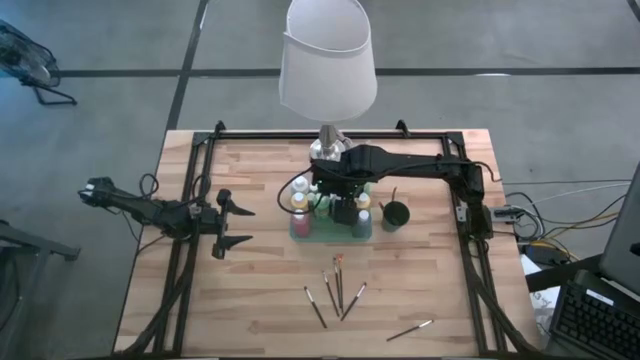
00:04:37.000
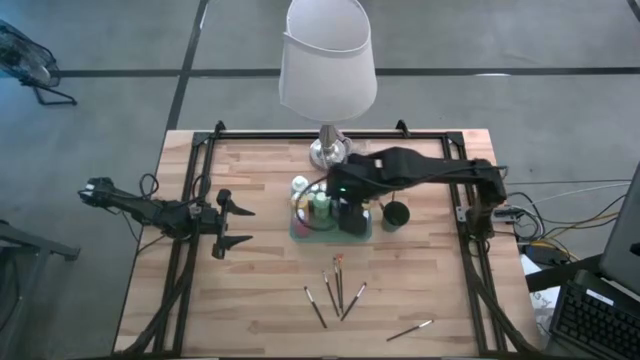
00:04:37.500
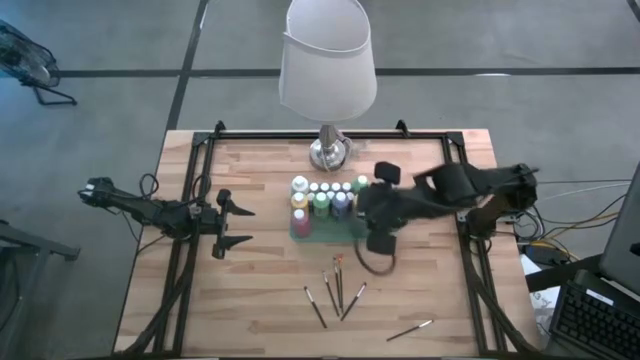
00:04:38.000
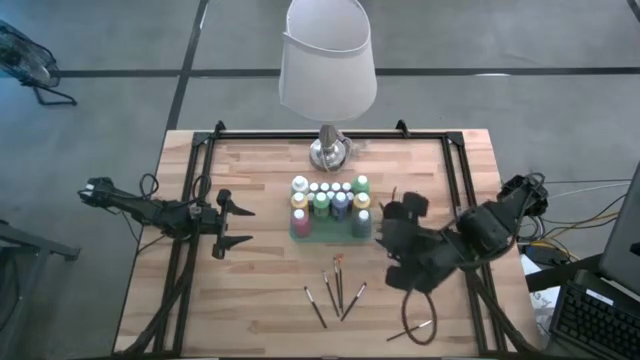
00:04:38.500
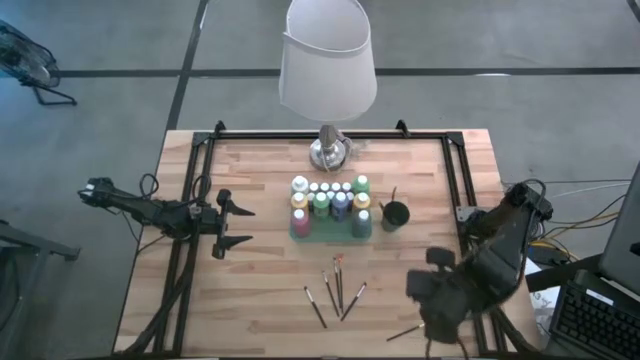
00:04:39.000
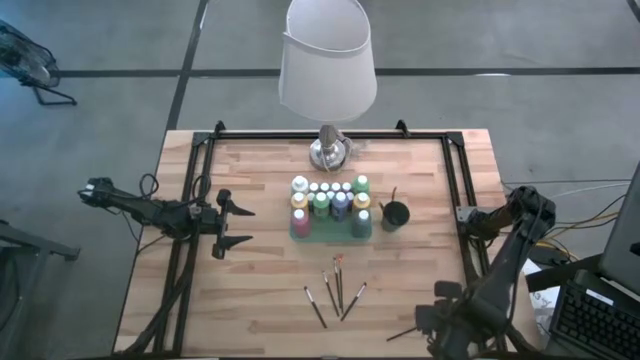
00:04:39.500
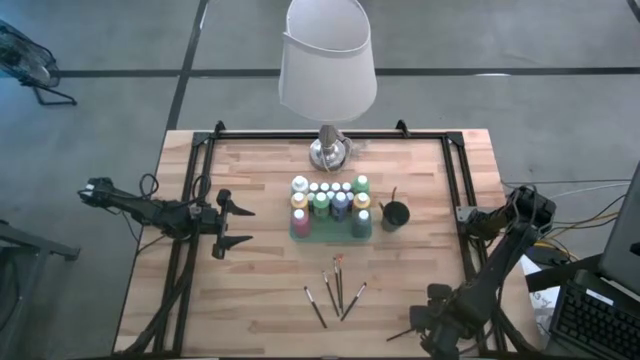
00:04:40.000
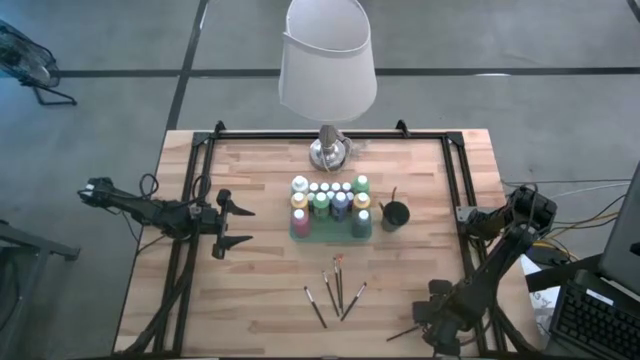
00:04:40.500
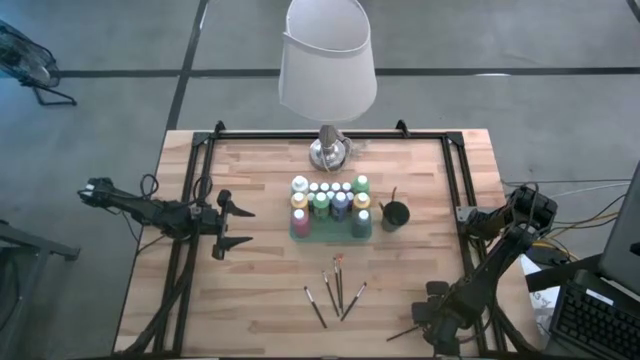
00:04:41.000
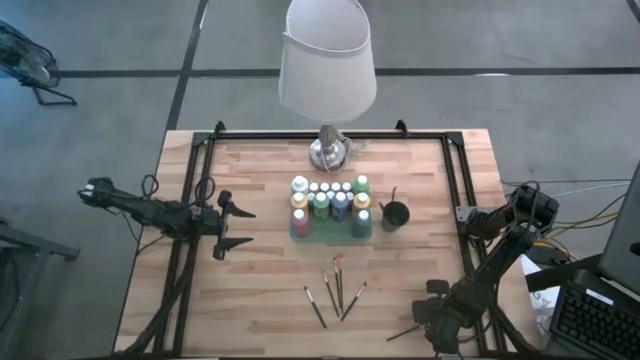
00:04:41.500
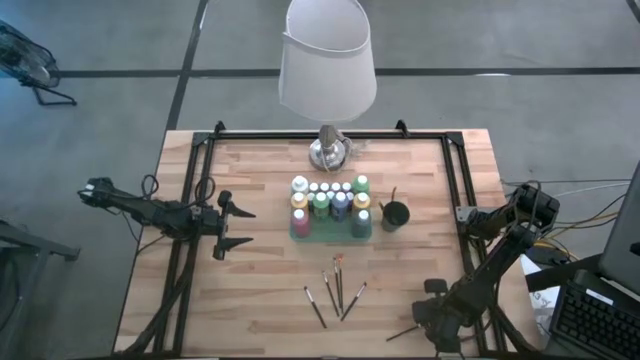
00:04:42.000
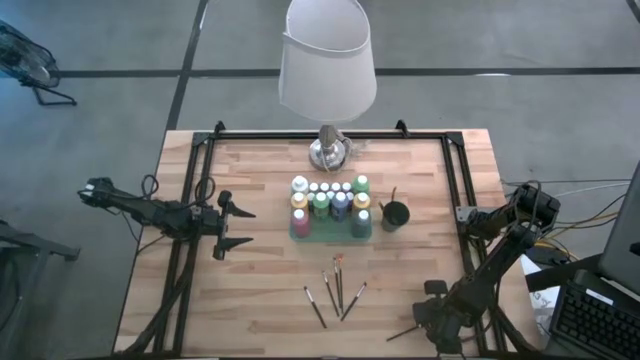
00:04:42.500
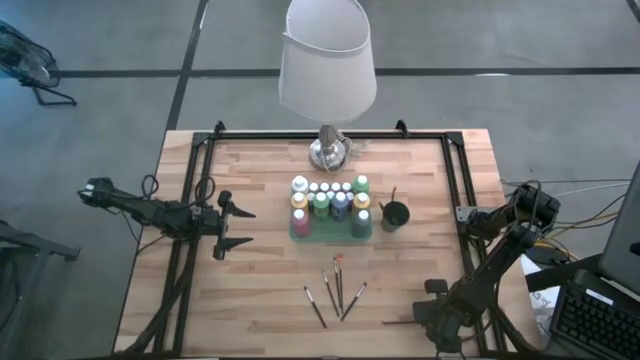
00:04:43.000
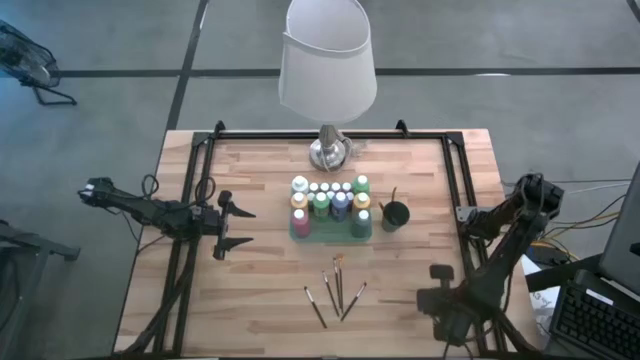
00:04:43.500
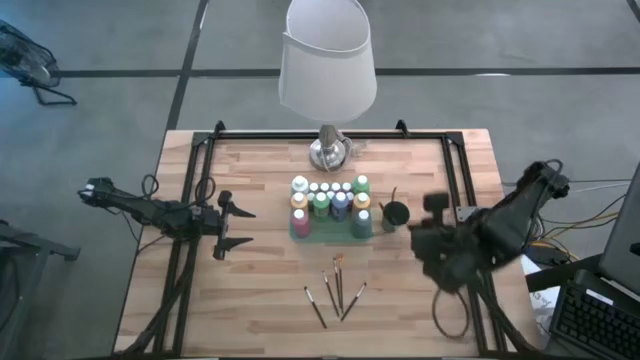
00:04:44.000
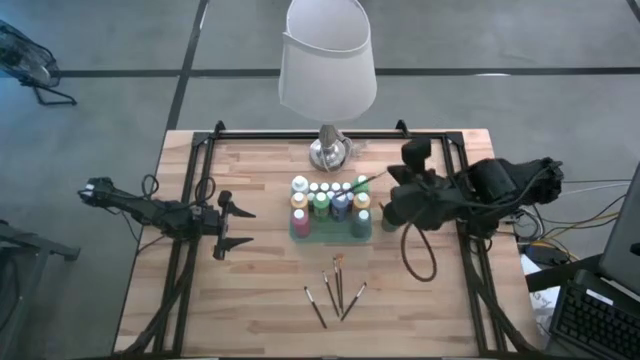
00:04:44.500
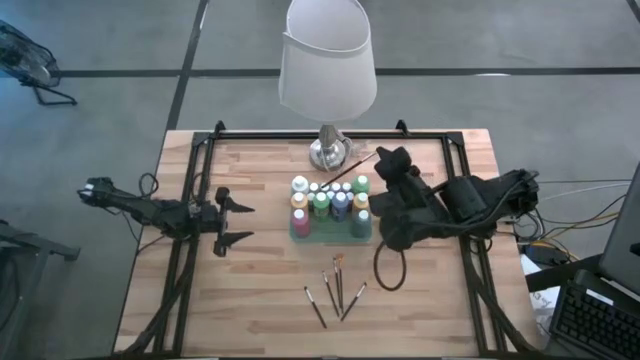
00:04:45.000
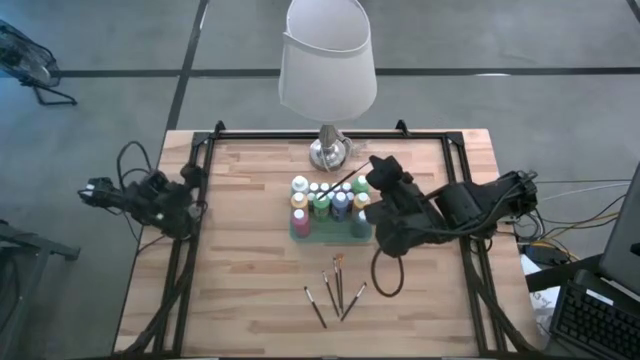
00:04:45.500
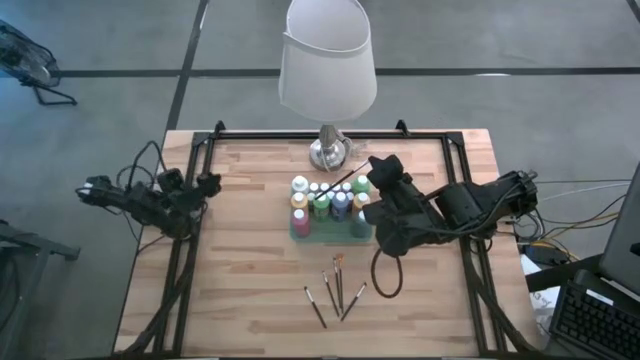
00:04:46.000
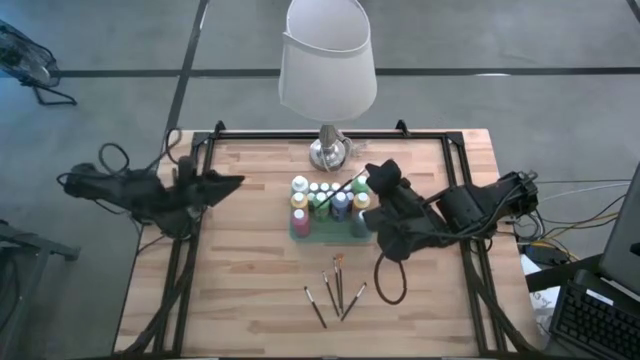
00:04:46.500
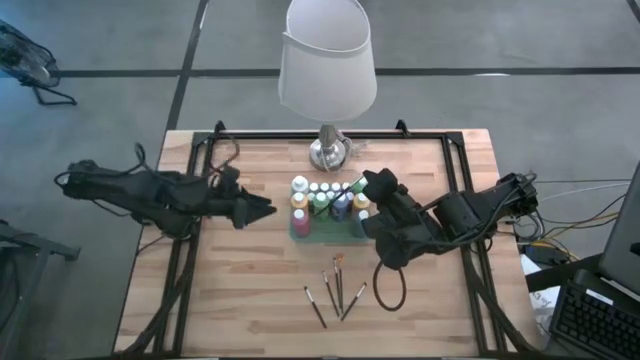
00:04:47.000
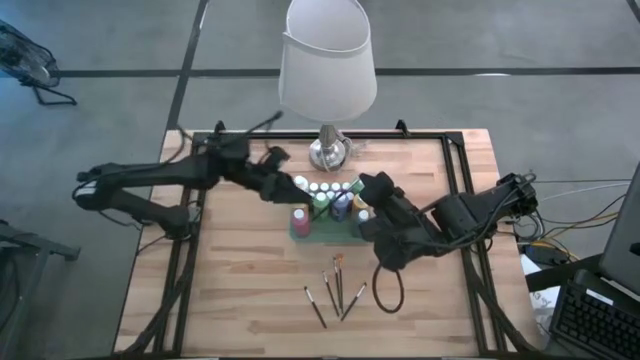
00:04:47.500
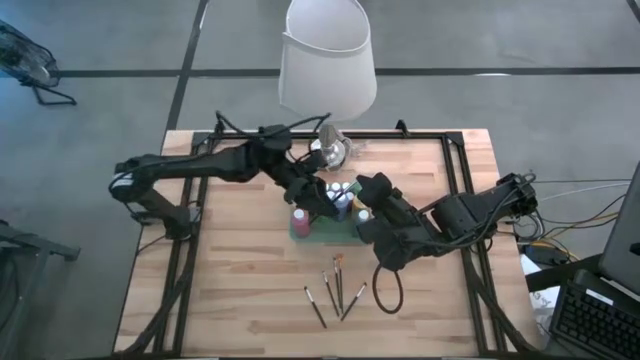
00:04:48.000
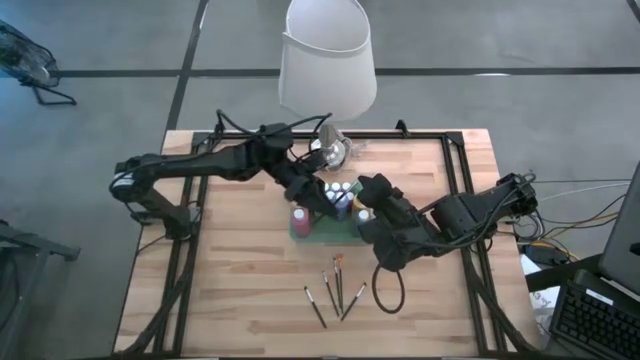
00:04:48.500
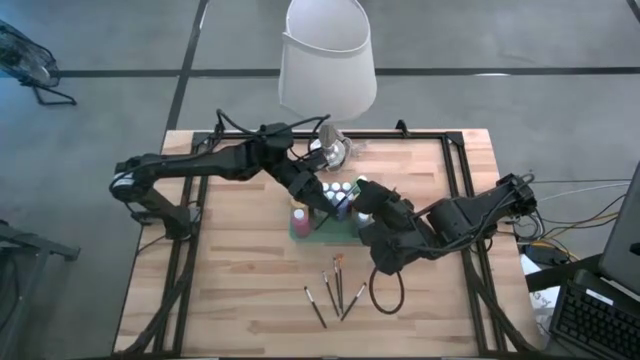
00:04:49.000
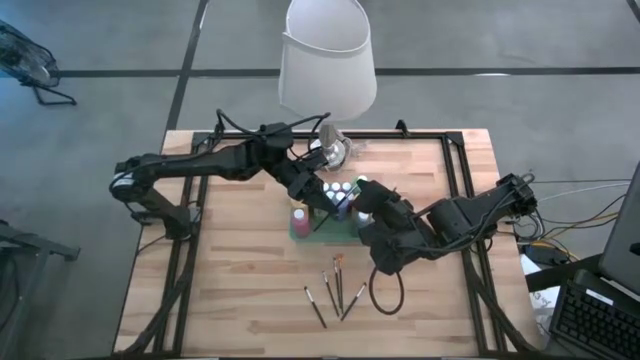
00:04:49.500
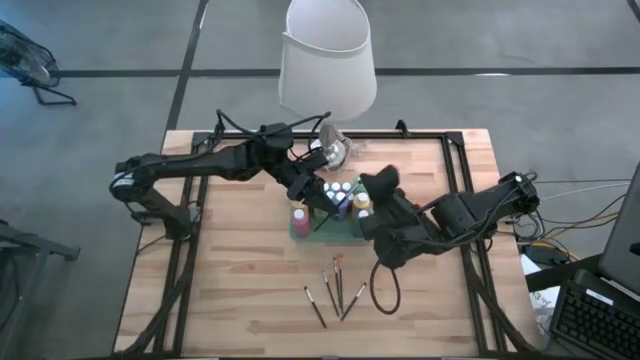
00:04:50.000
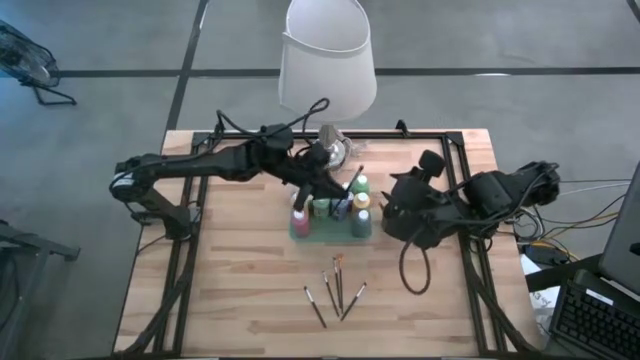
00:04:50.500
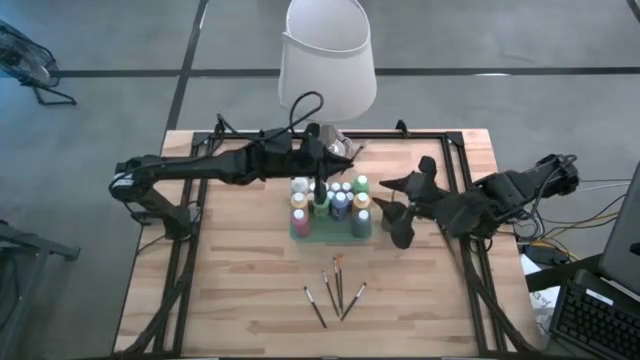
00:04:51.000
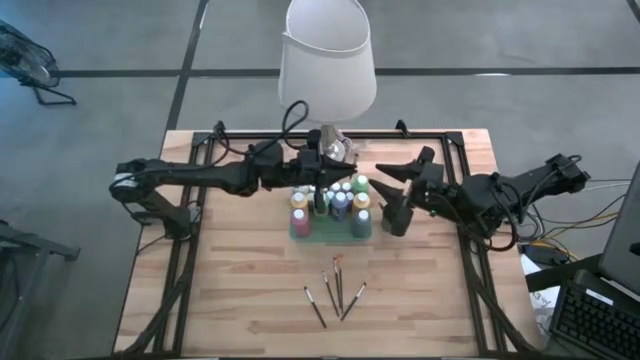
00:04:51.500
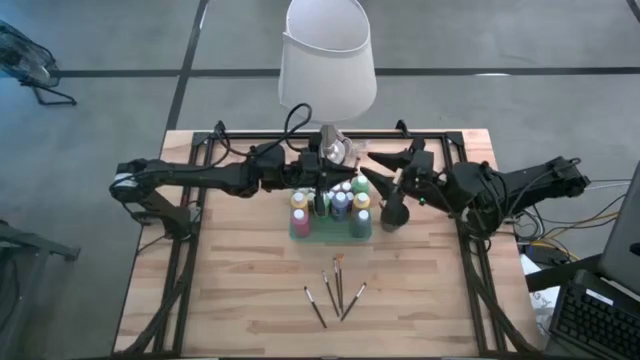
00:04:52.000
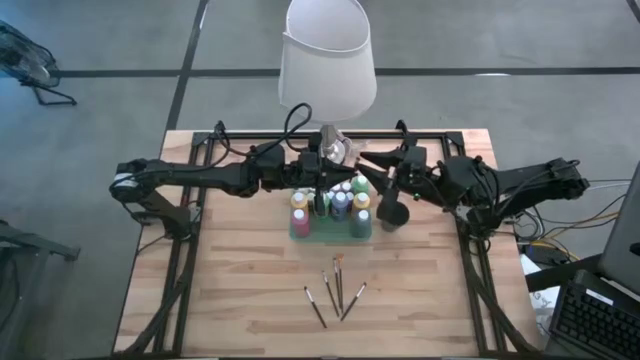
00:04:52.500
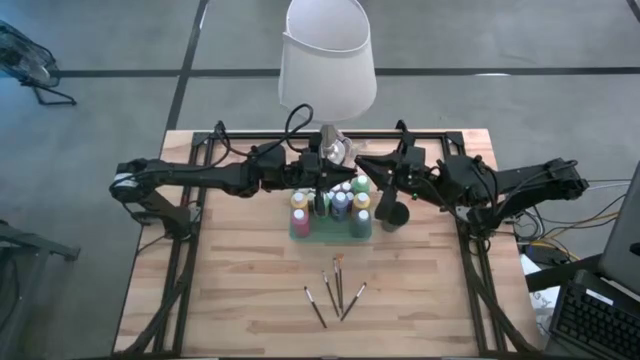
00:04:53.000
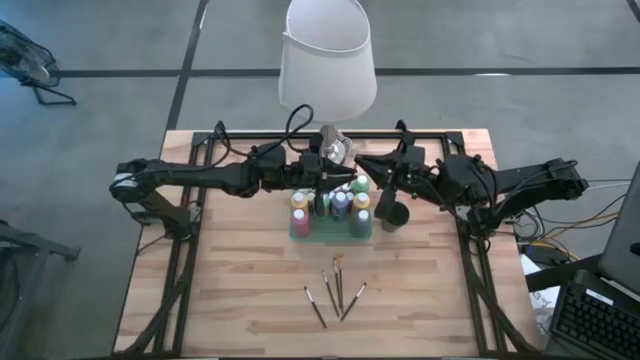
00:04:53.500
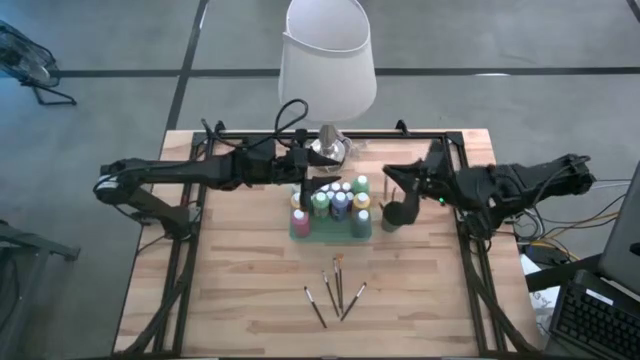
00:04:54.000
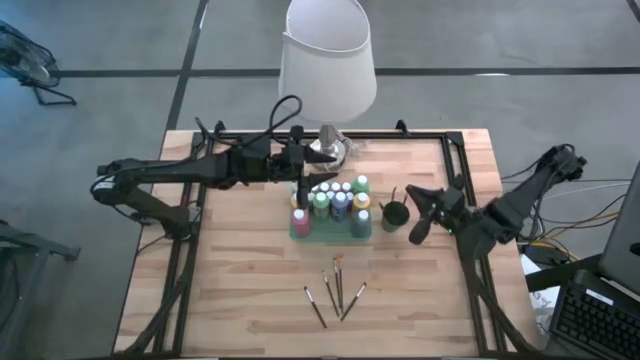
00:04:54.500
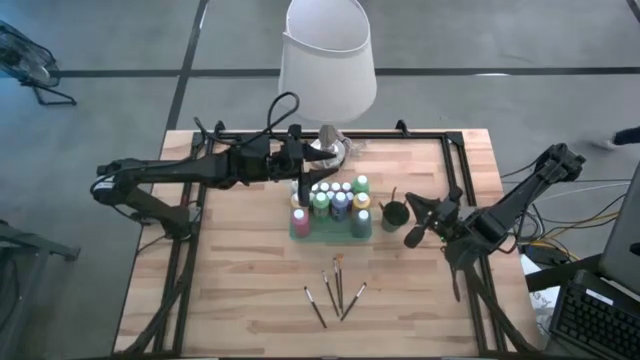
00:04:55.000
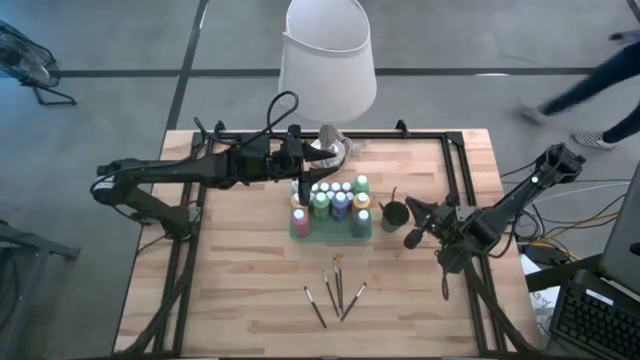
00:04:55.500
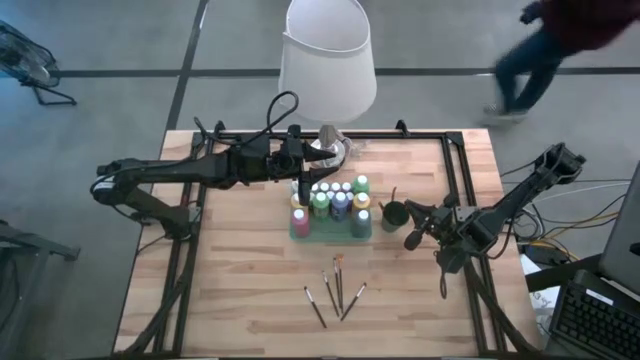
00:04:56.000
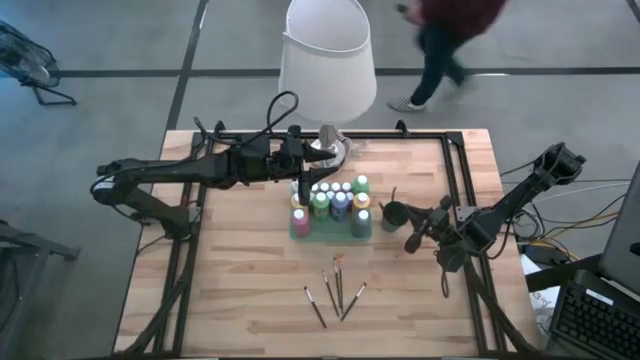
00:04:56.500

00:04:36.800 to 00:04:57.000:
Task: Pick & Place Paint Supplies
Put the black paint brush into the black cup

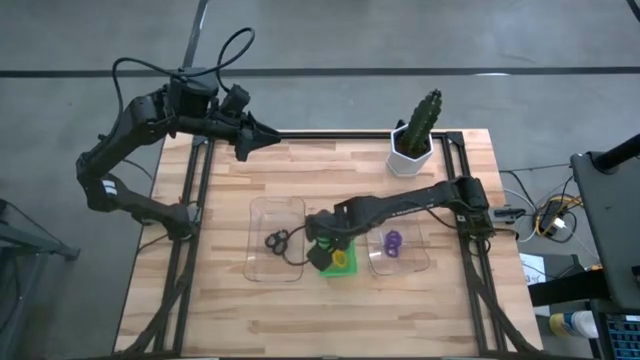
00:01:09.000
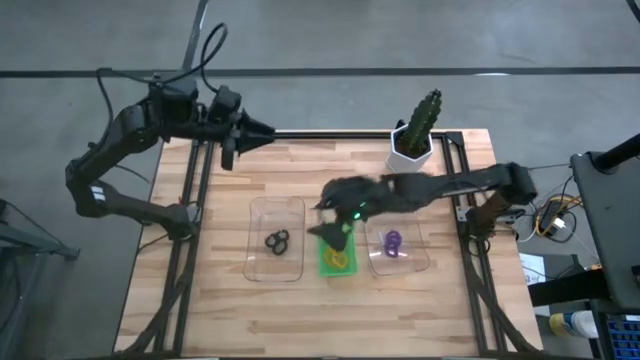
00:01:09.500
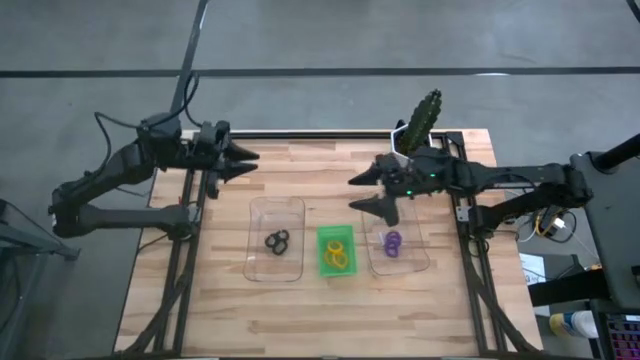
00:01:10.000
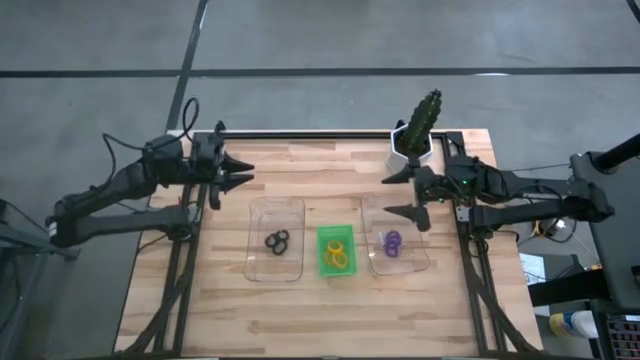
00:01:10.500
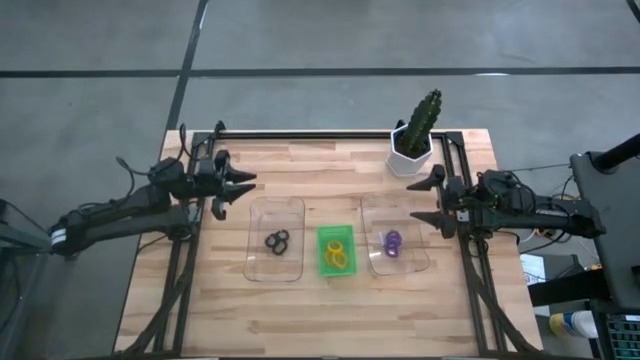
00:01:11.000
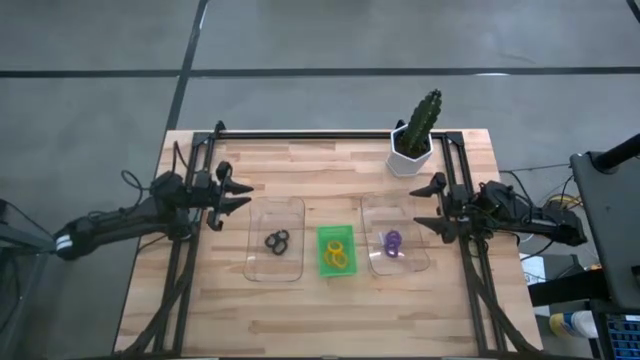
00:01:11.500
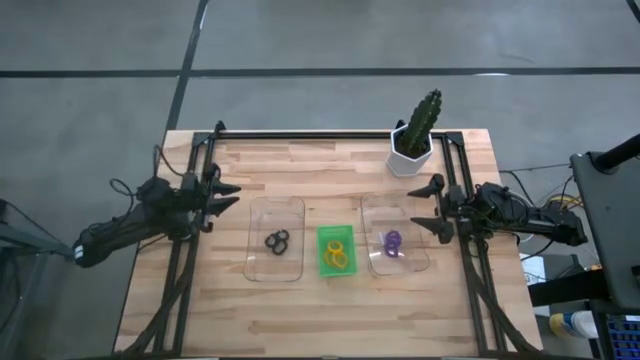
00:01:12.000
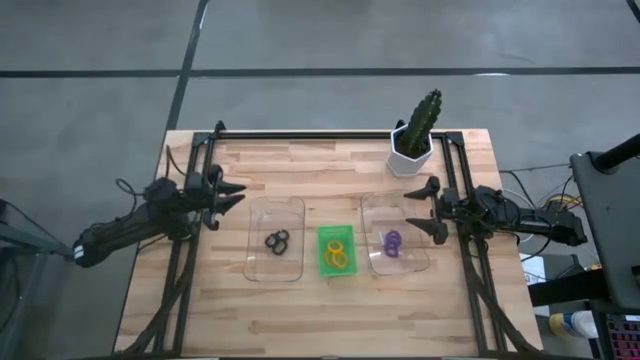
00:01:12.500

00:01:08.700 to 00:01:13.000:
Task: Sort spring keychains
Return to Home Position
